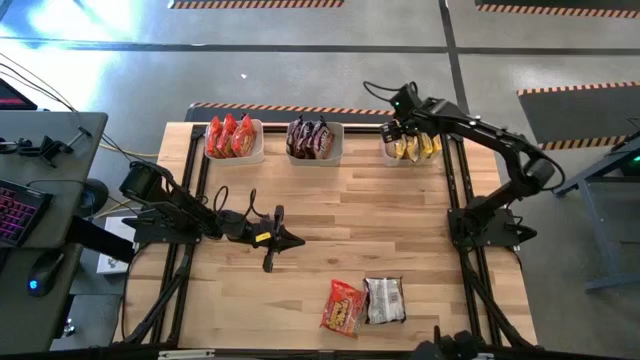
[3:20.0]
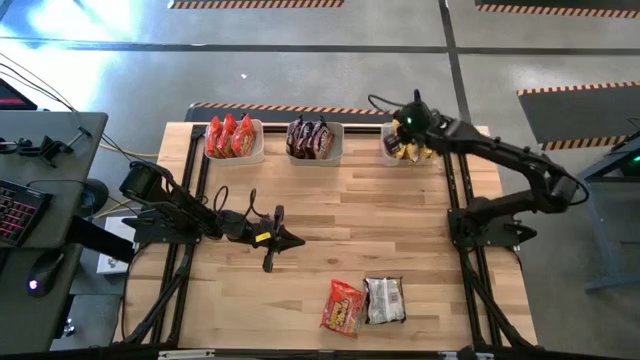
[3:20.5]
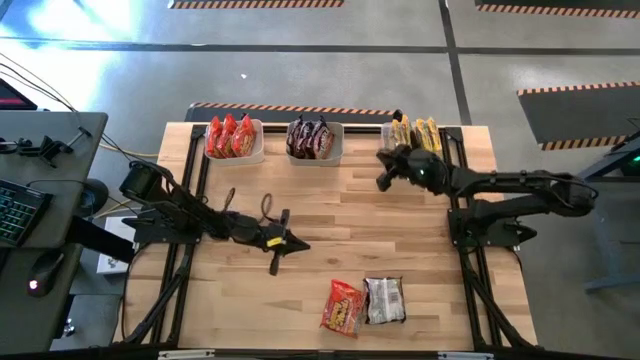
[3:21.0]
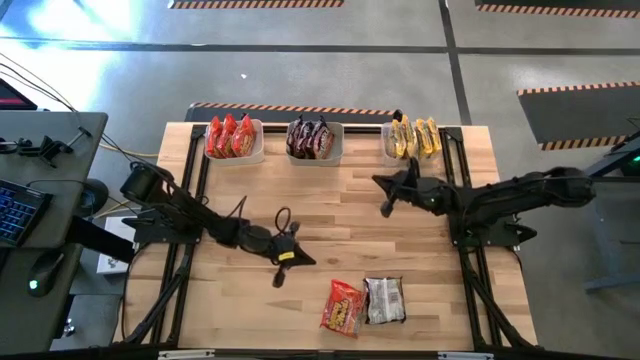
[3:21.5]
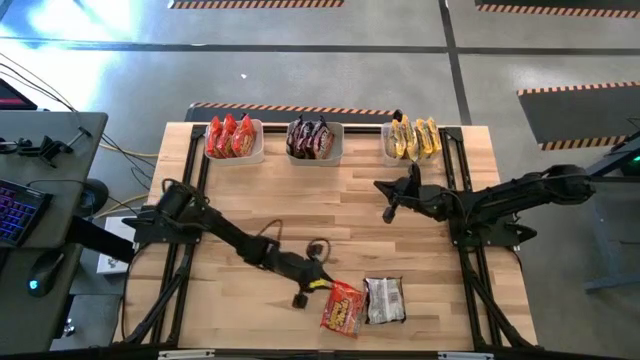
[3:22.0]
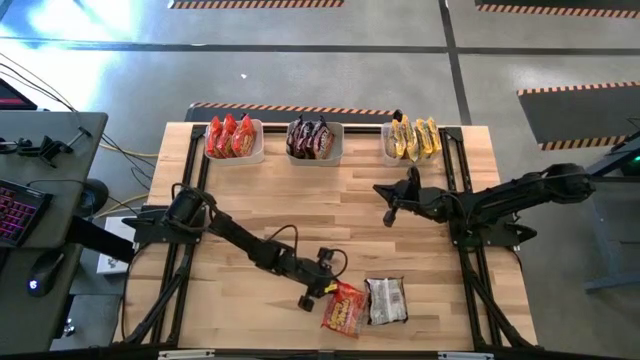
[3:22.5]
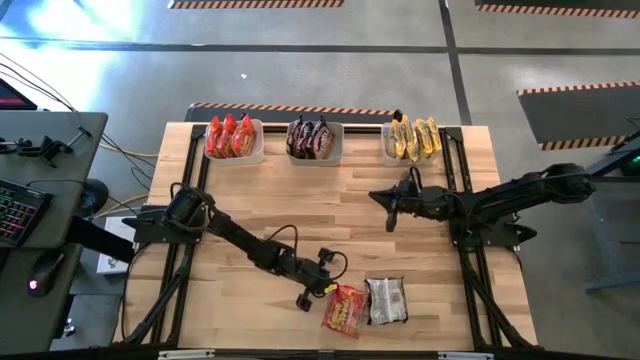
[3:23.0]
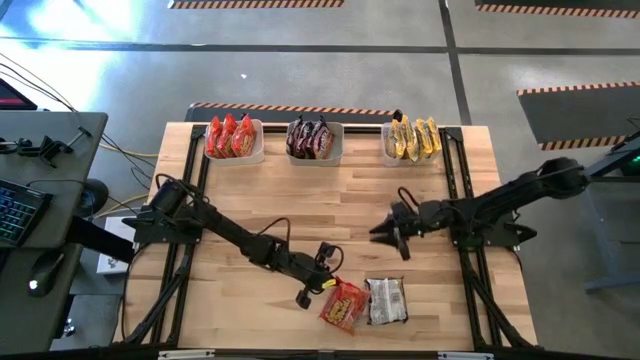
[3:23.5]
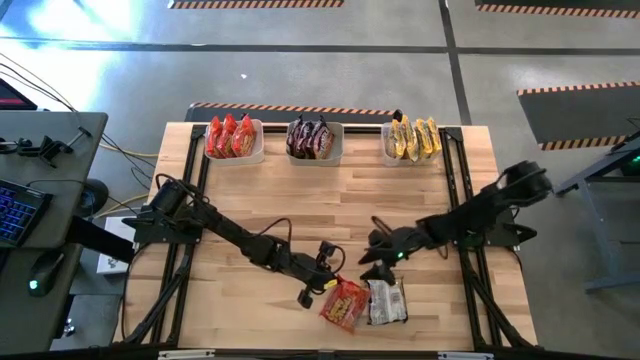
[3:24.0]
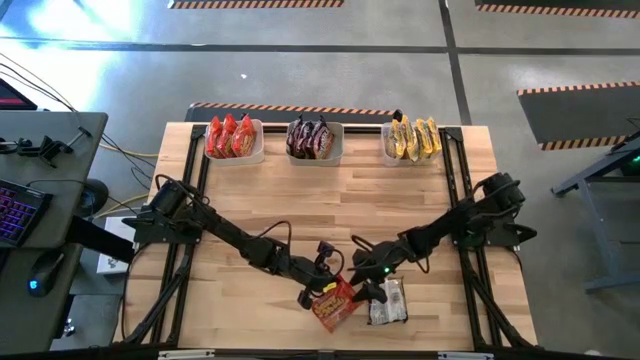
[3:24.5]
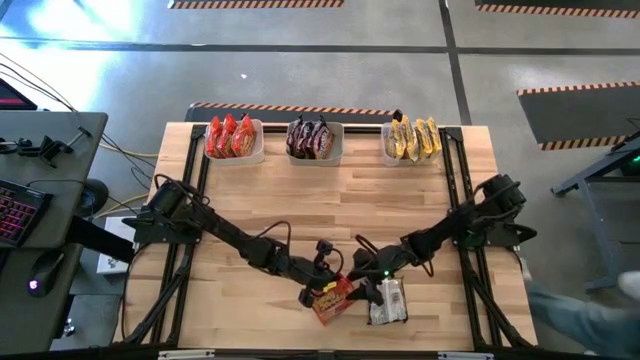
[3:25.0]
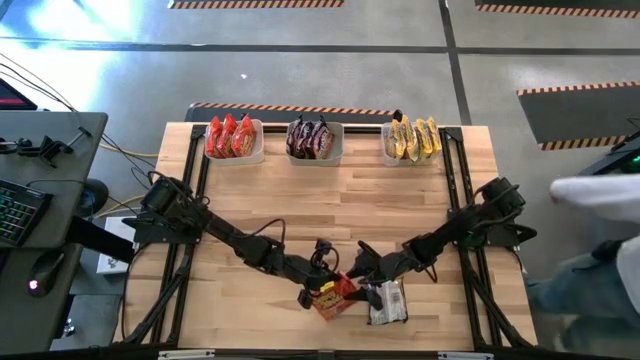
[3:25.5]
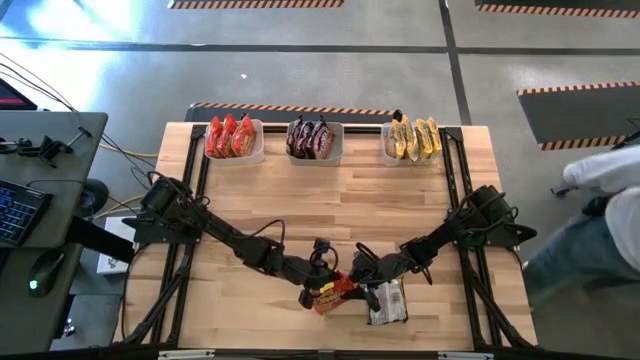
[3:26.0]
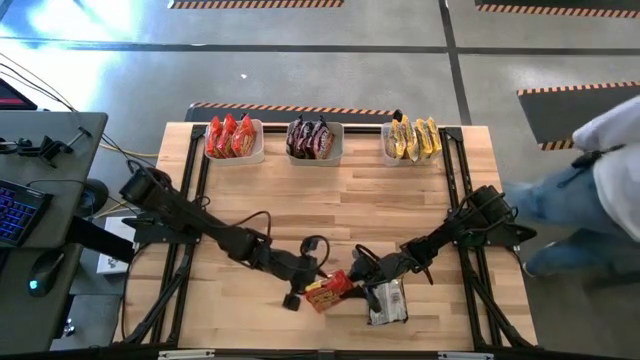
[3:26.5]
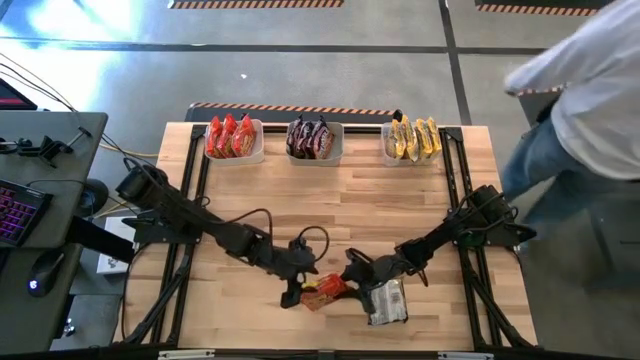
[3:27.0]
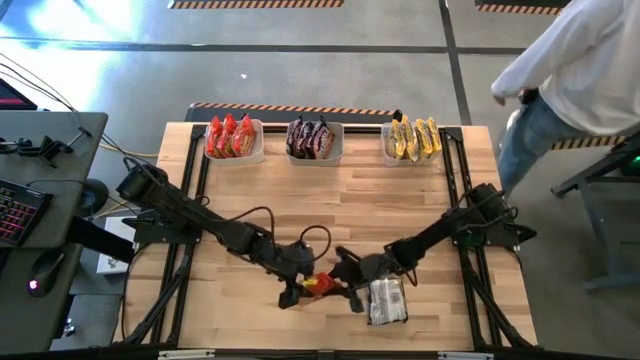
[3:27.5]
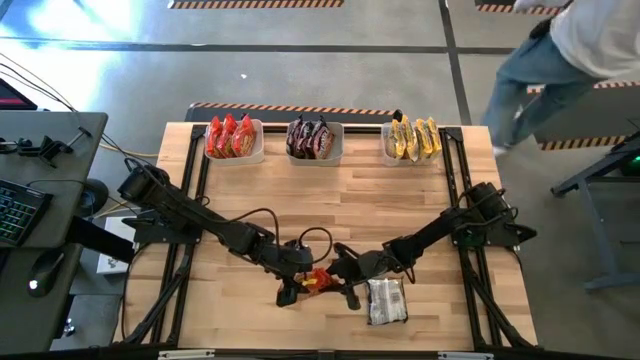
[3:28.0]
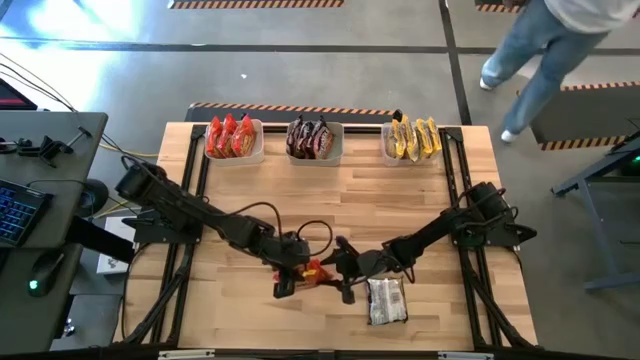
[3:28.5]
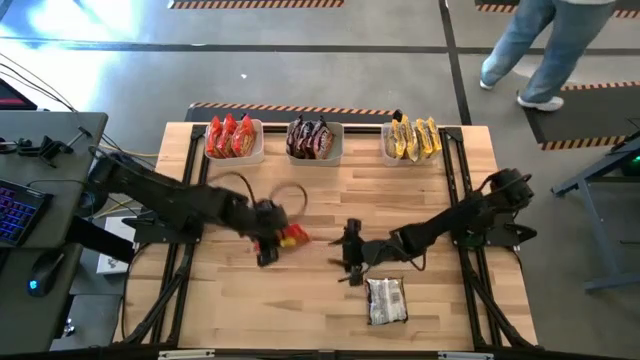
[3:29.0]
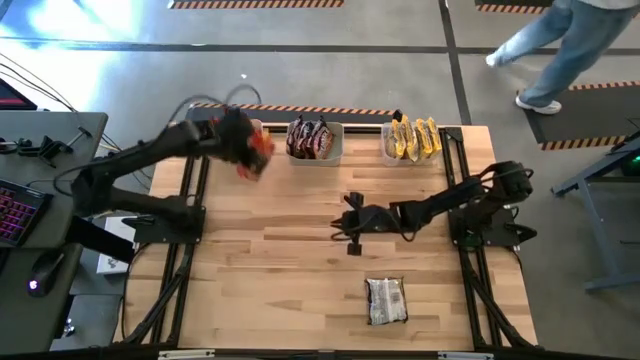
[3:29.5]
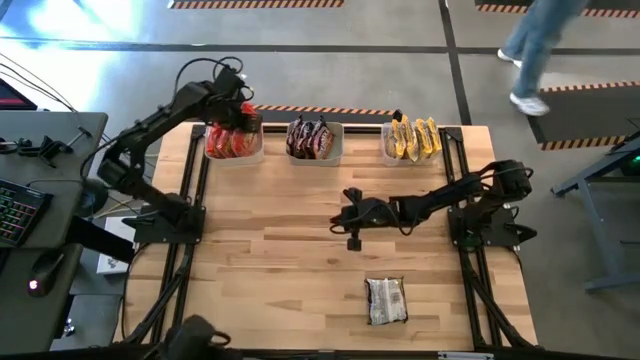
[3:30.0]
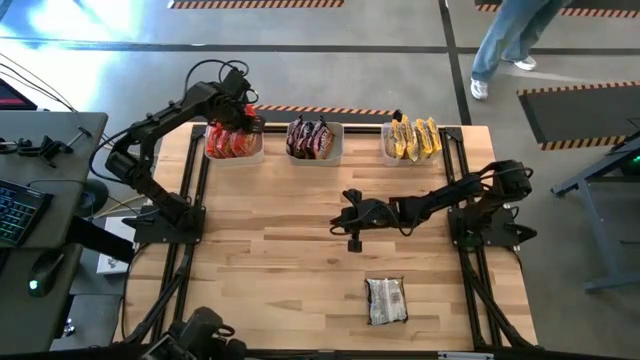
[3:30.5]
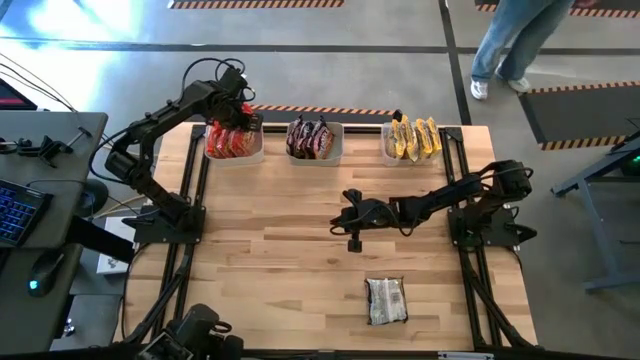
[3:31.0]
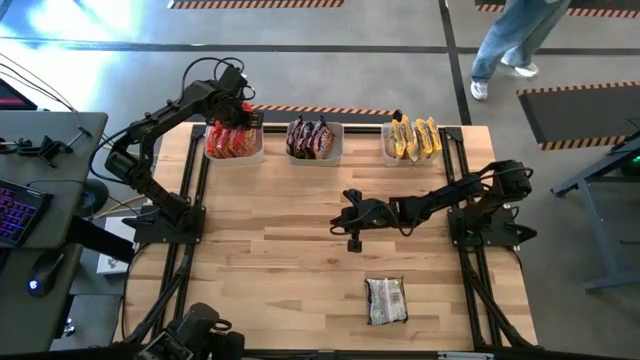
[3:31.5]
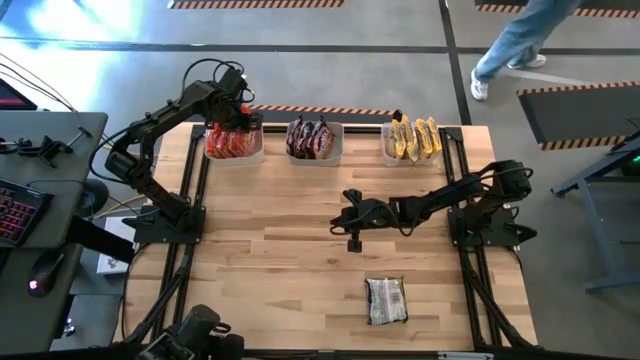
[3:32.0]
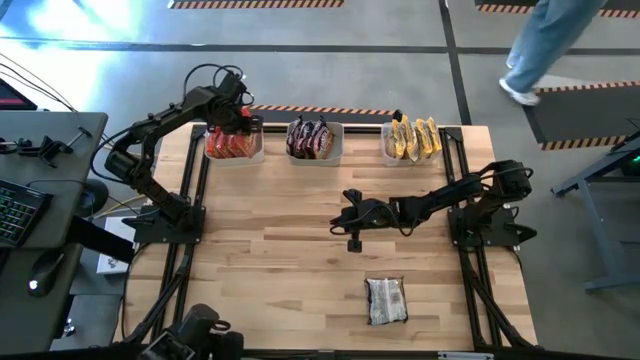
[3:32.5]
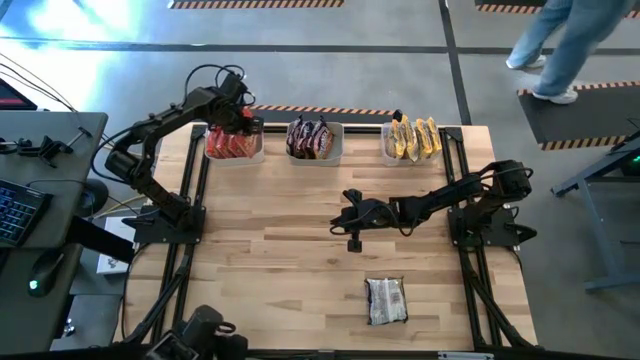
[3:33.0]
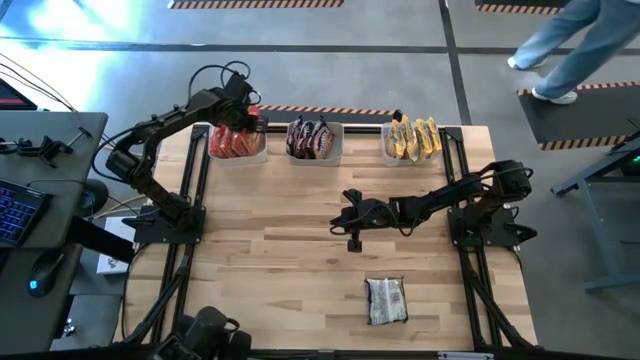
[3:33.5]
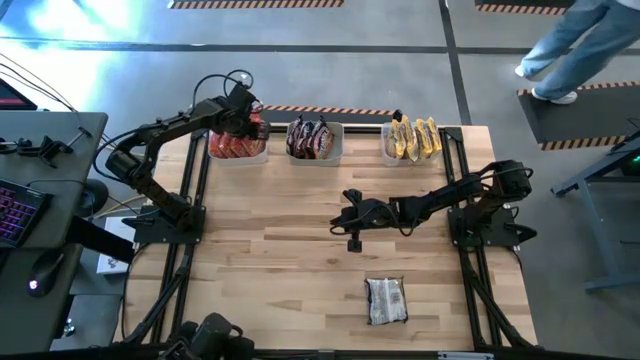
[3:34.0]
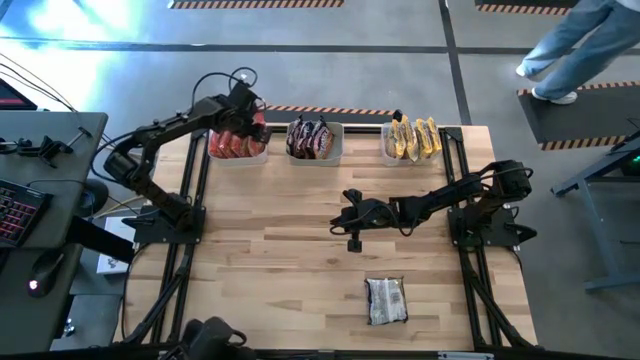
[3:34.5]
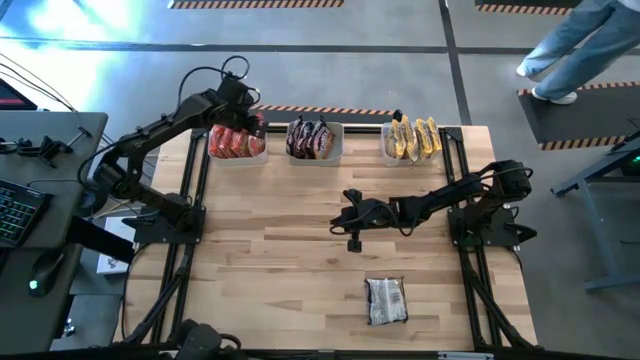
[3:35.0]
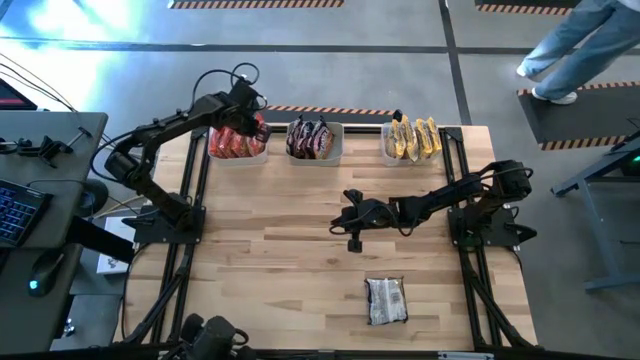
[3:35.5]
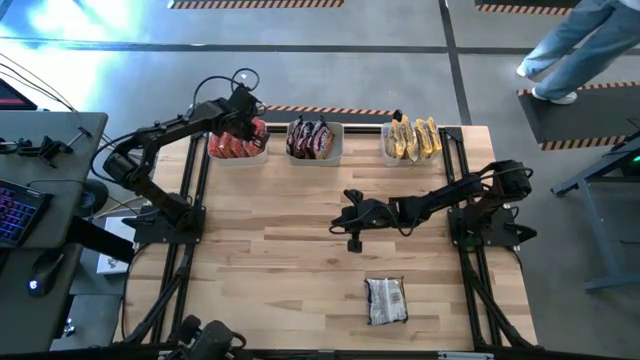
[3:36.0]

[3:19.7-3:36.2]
Task: Sort Maruchan noodles
Put the orange noodle pack into the white bin

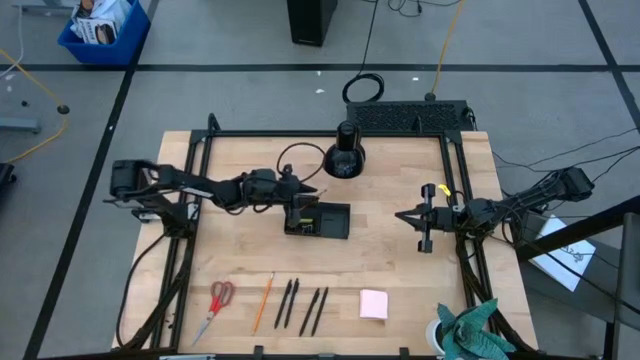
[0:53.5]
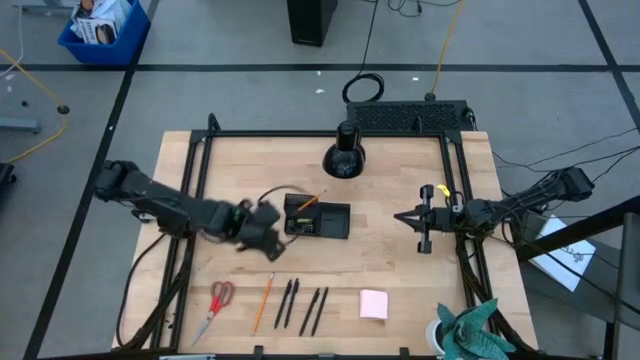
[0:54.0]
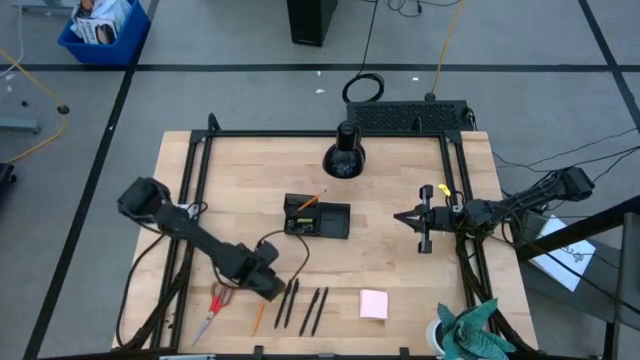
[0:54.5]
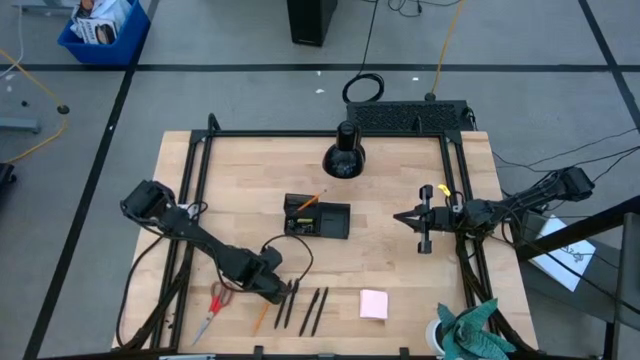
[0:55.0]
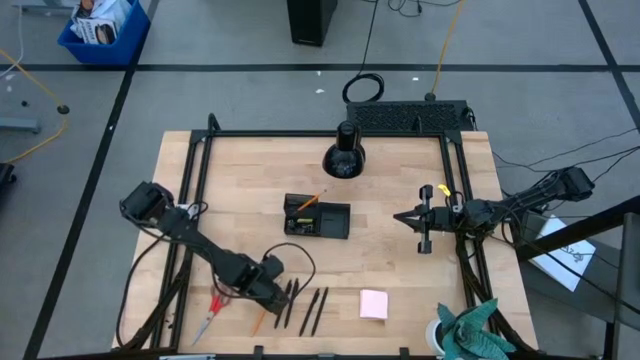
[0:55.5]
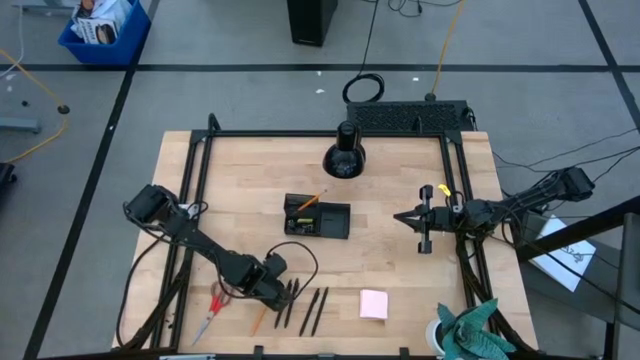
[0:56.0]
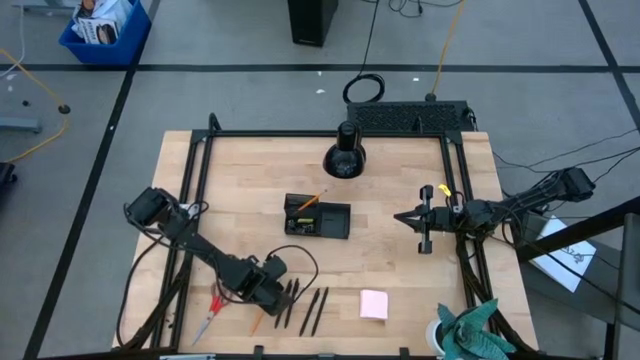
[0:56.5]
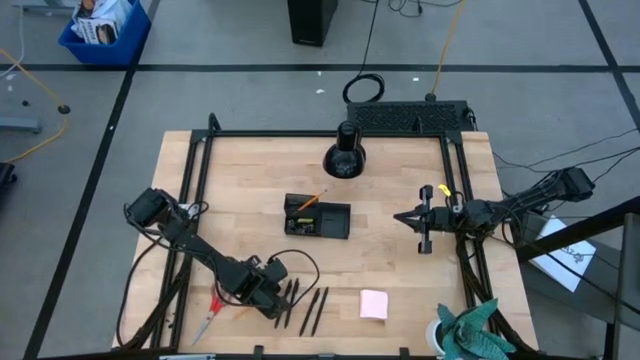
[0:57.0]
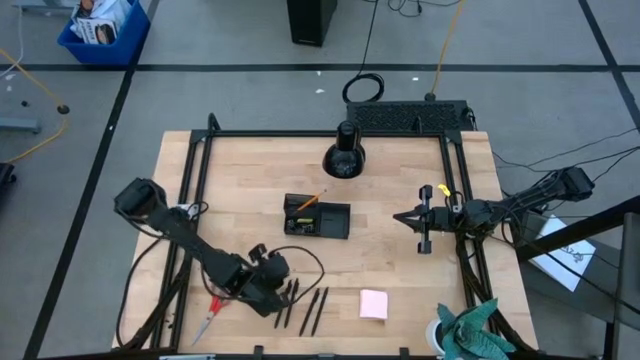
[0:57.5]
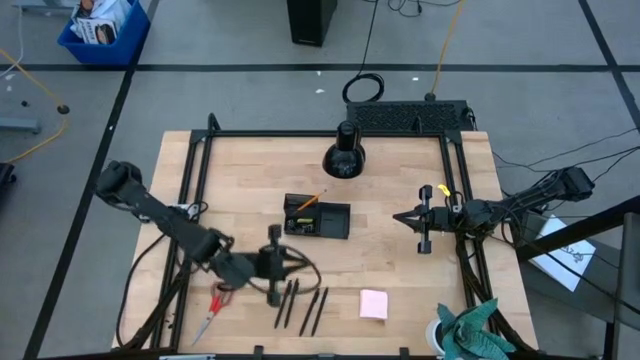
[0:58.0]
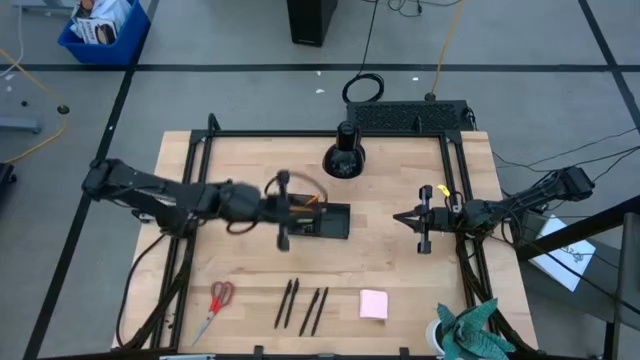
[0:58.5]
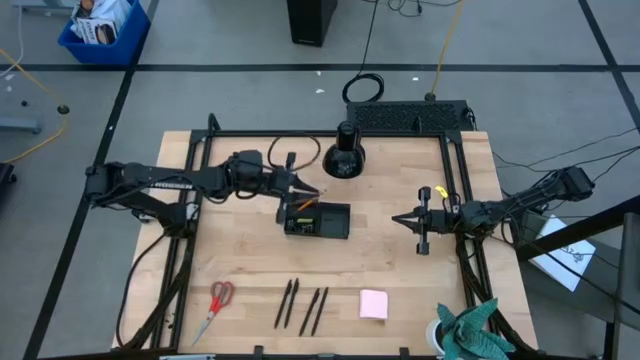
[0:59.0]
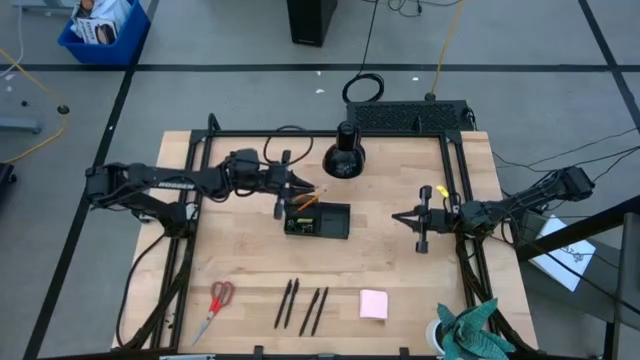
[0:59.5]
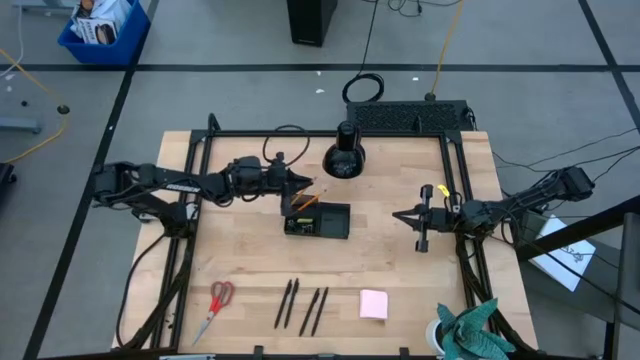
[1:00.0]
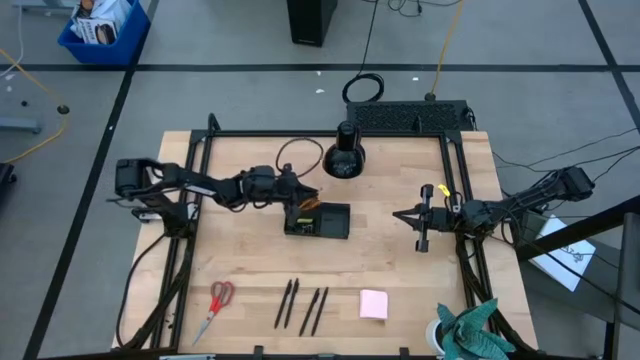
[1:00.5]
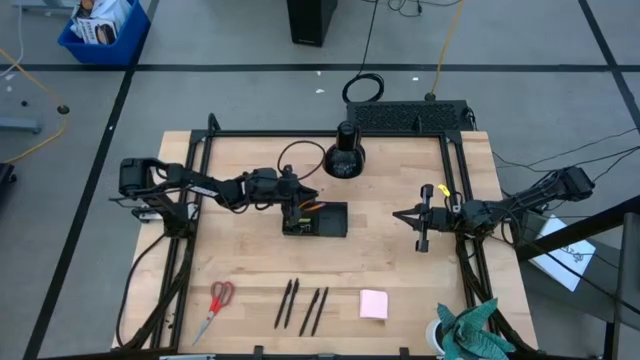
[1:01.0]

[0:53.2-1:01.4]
Task: Pick and place office supplies into organizer
Put the pencil into the desk organizer
